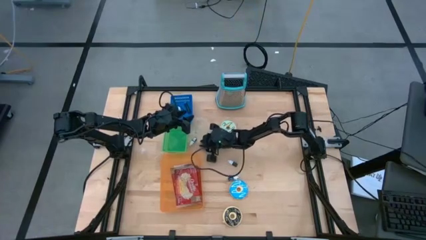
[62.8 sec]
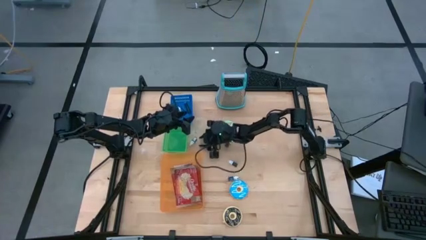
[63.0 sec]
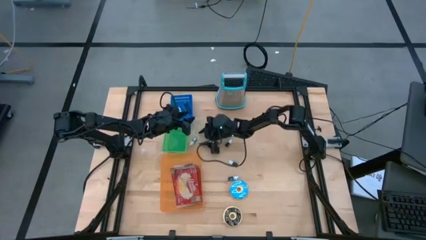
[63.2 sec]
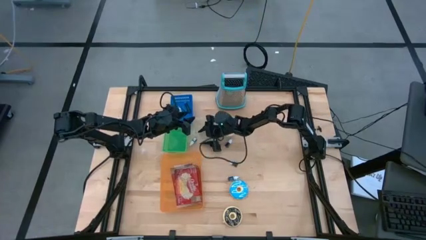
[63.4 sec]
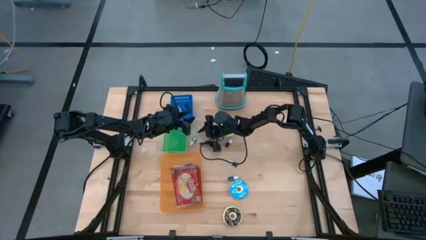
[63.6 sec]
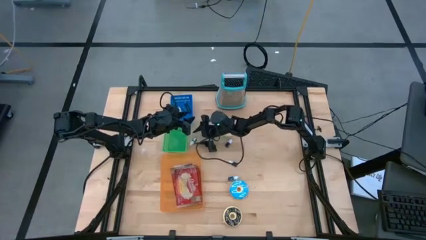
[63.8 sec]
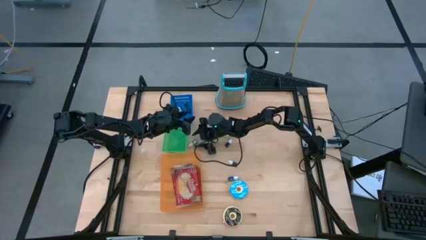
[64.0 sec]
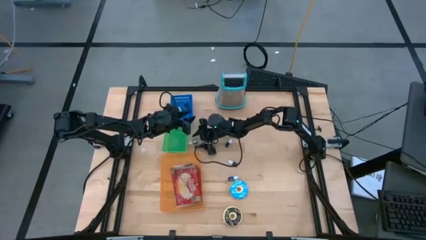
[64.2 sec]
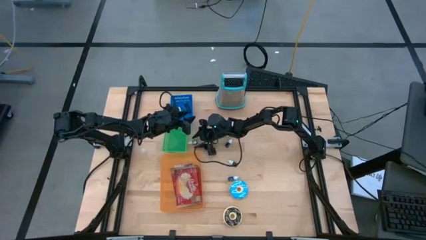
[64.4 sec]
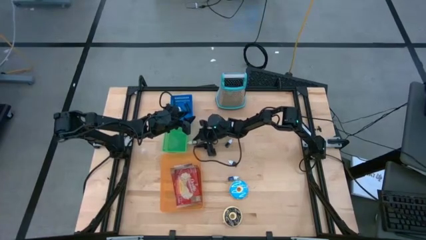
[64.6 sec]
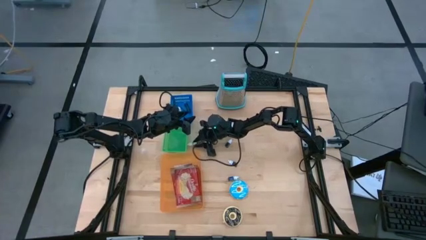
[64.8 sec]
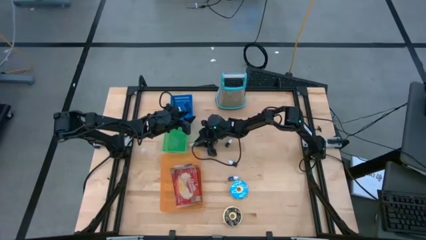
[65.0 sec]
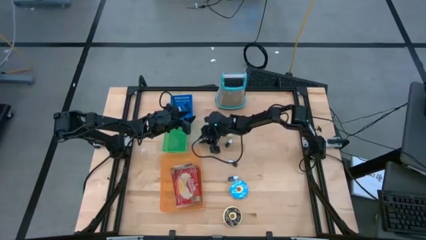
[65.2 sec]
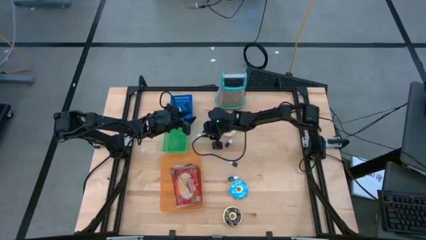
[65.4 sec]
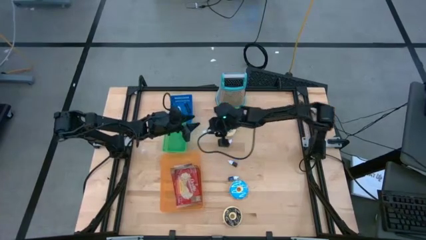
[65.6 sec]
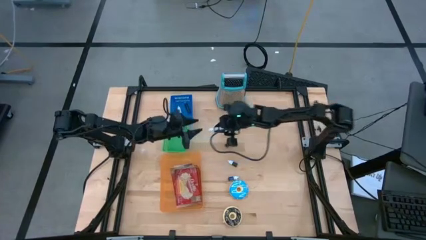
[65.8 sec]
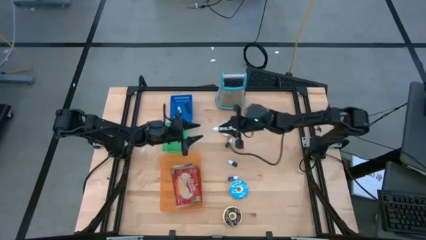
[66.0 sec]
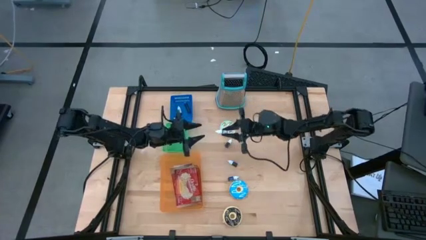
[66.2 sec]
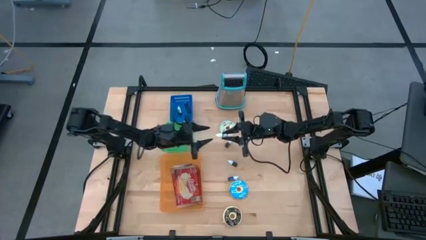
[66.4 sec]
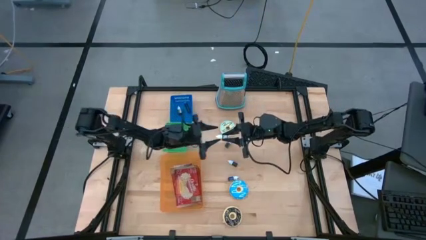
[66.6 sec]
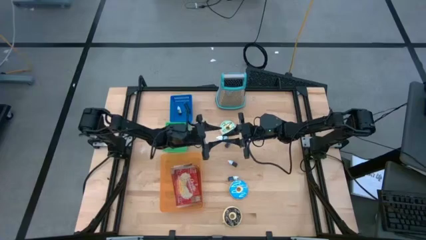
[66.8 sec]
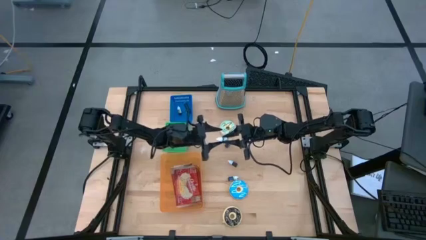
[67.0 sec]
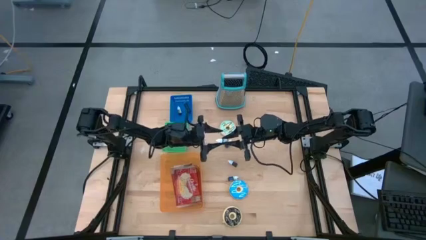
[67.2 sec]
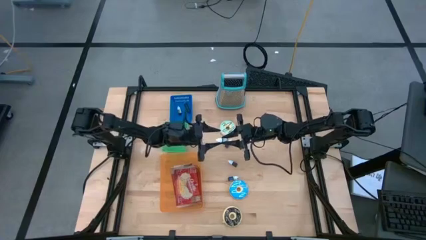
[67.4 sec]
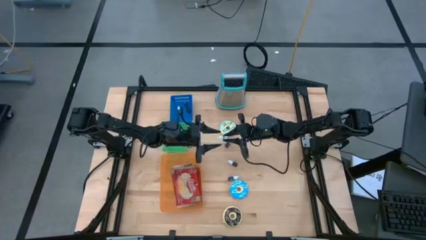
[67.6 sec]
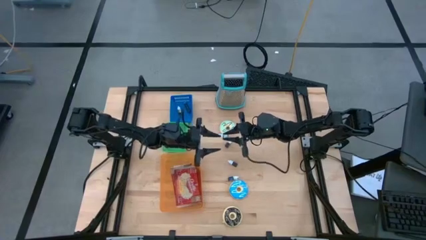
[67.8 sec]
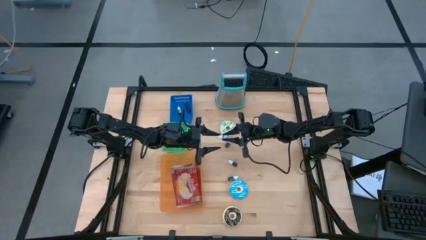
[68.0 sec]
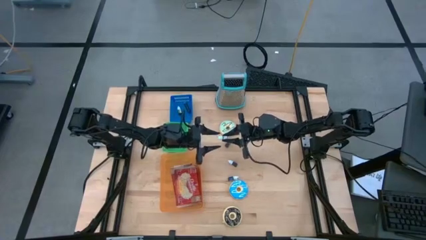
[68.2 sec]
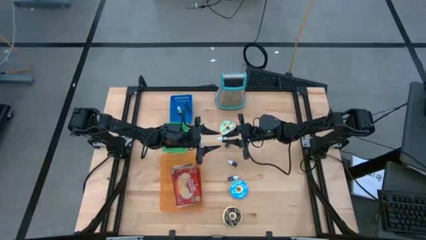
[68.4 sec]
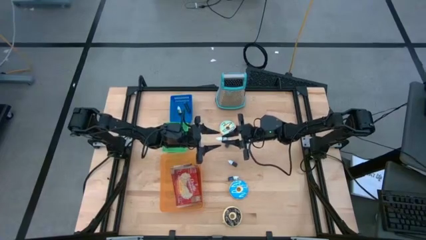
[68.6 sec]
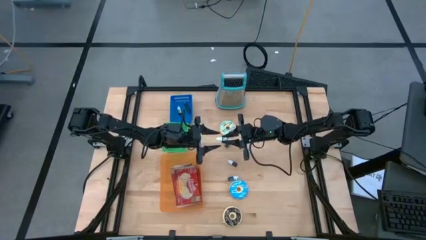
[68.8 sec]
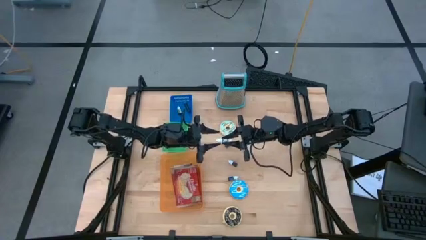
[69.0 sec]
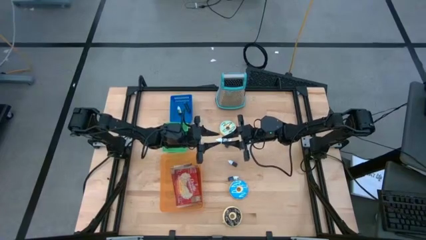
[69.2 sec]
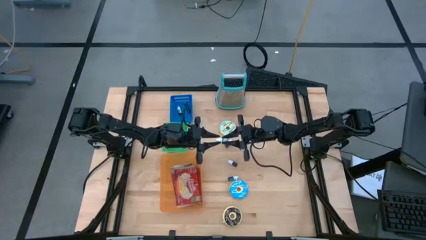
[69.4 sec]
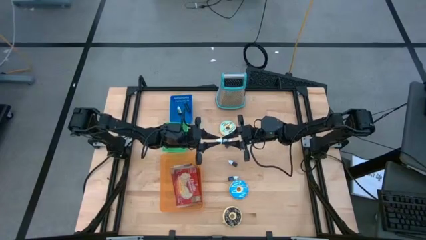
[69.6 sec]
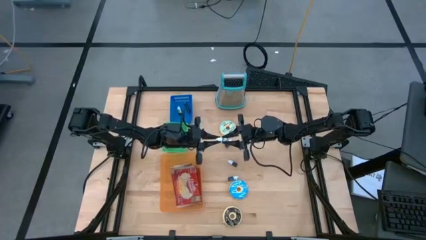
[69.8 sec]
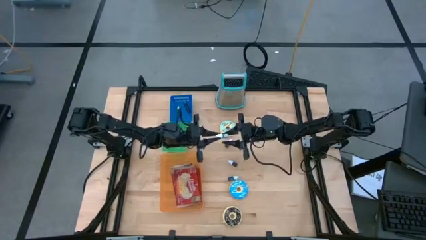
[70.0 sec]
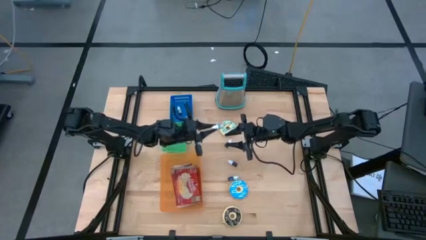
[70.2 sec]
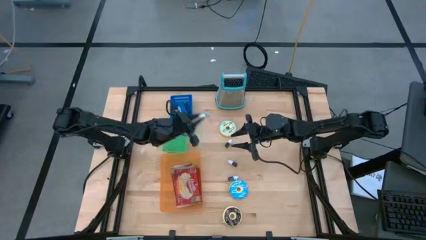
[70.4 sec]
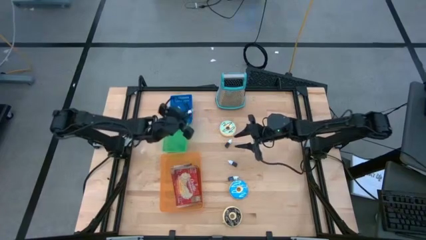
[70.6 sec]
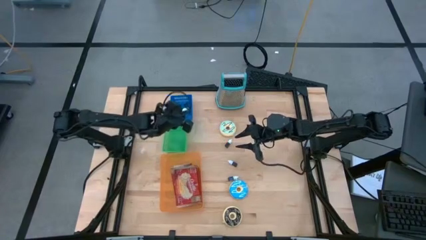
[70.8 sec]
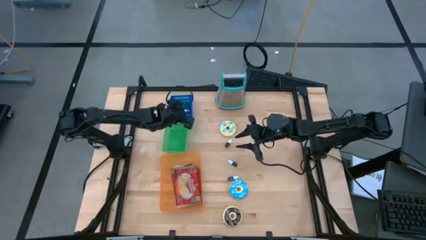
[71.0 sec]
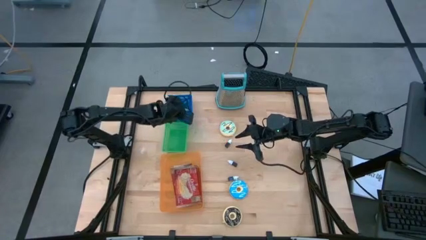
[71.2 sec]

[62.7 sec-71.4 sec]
Put the brown food coloring bottle into the blue bin

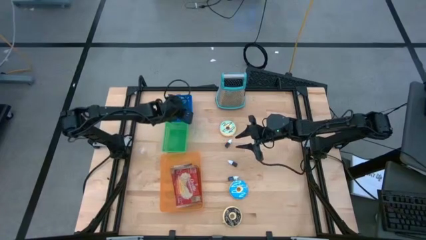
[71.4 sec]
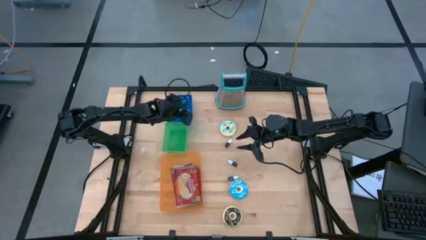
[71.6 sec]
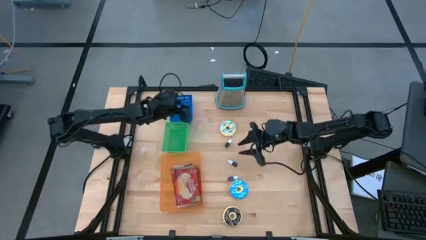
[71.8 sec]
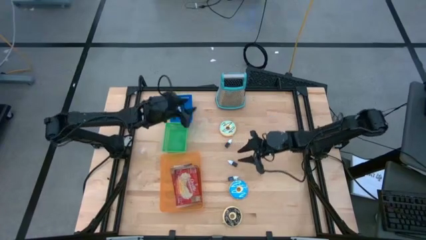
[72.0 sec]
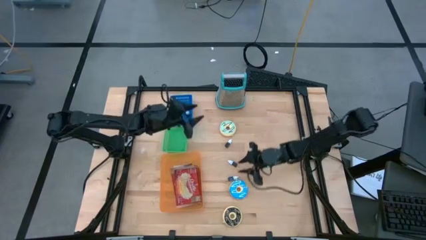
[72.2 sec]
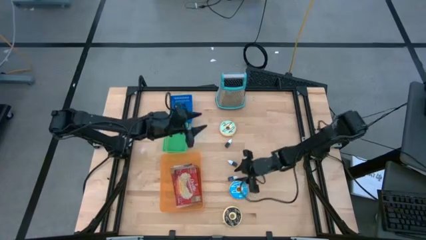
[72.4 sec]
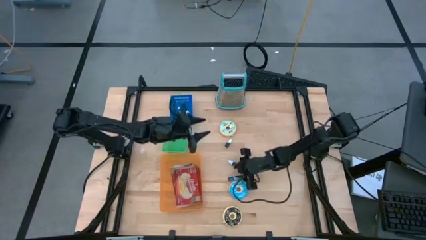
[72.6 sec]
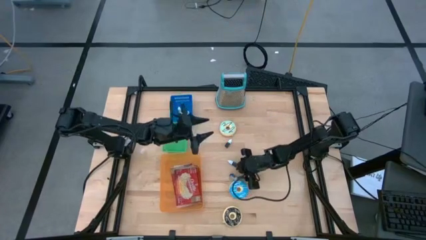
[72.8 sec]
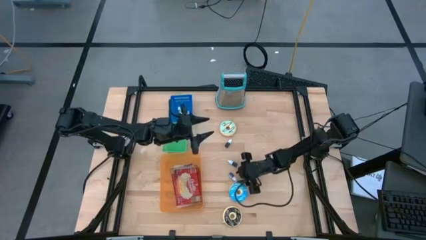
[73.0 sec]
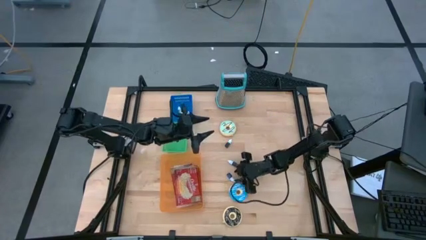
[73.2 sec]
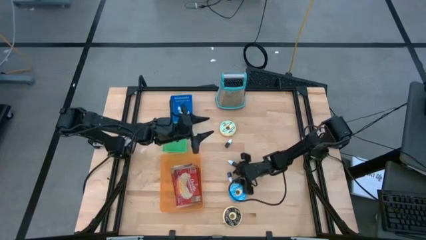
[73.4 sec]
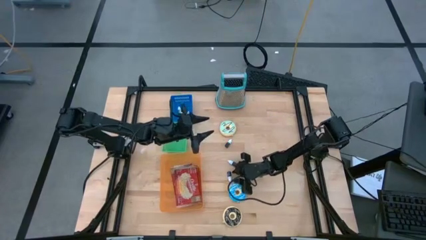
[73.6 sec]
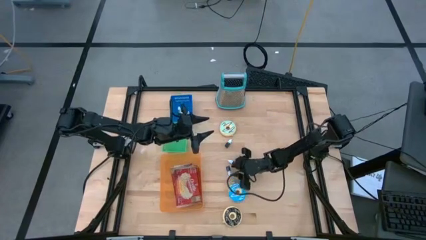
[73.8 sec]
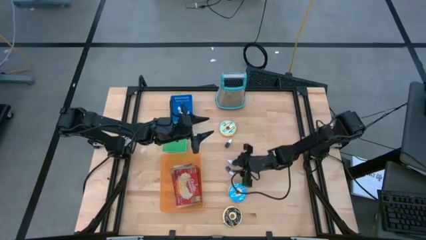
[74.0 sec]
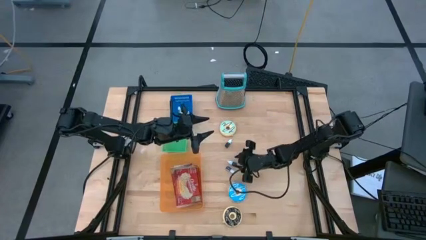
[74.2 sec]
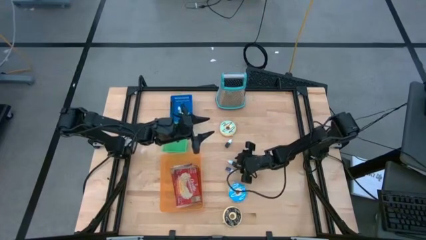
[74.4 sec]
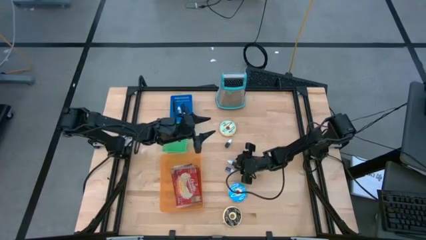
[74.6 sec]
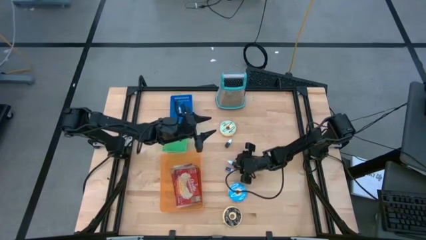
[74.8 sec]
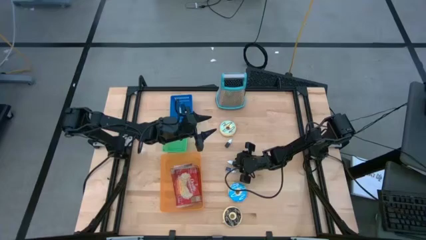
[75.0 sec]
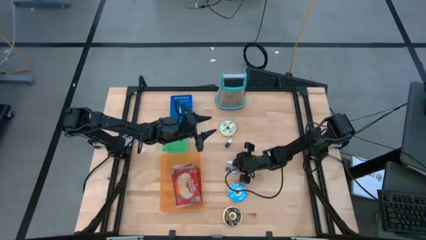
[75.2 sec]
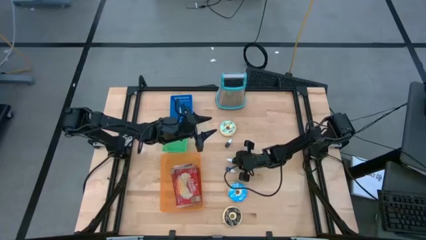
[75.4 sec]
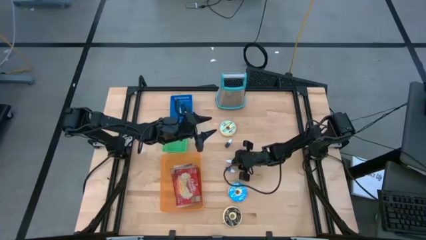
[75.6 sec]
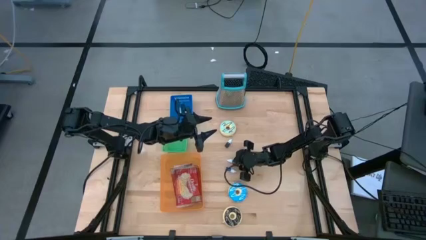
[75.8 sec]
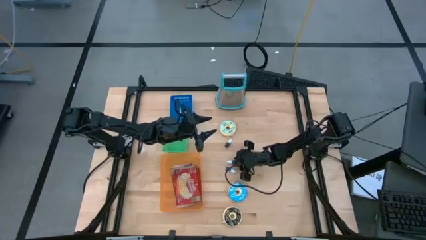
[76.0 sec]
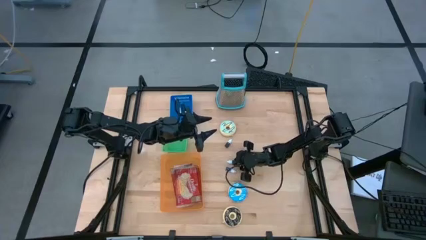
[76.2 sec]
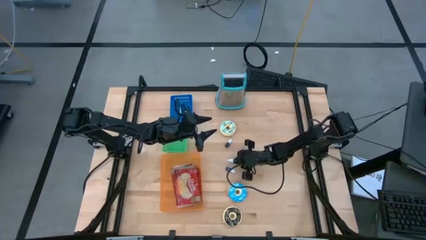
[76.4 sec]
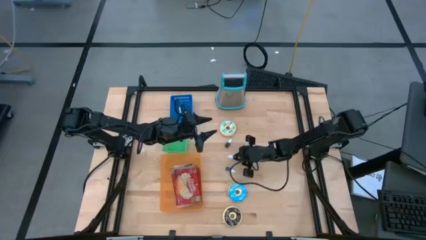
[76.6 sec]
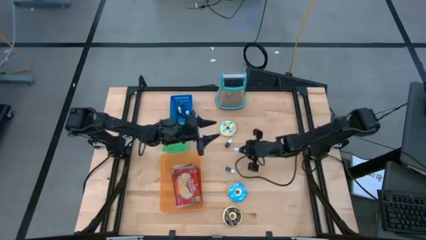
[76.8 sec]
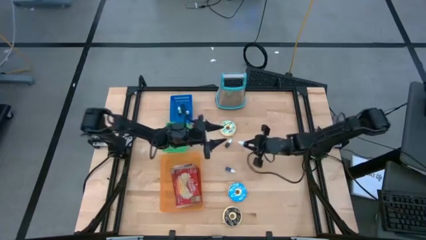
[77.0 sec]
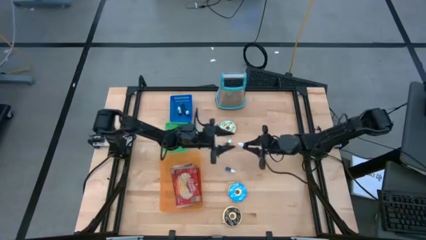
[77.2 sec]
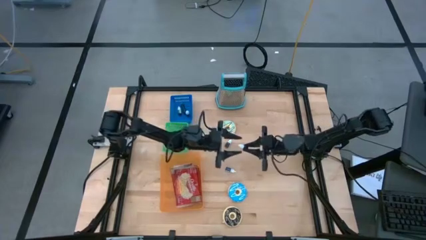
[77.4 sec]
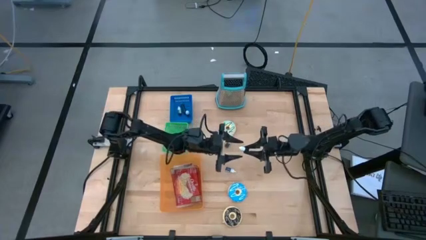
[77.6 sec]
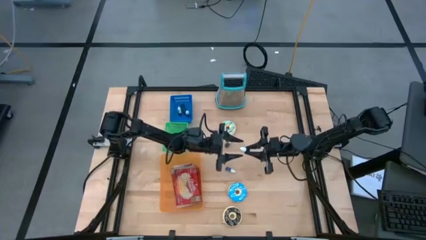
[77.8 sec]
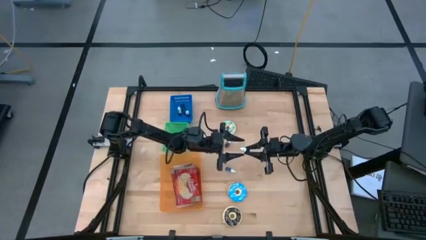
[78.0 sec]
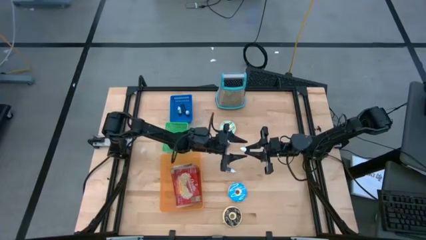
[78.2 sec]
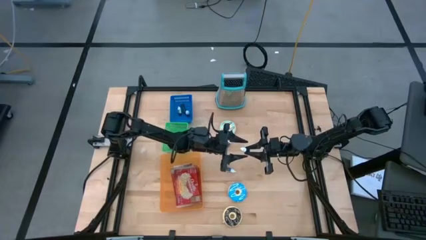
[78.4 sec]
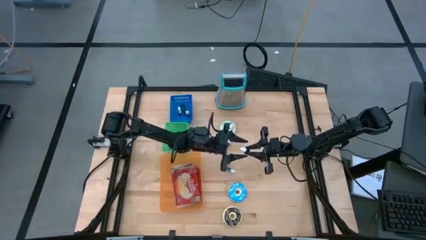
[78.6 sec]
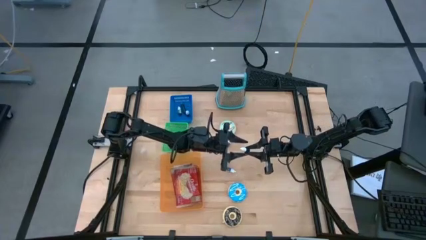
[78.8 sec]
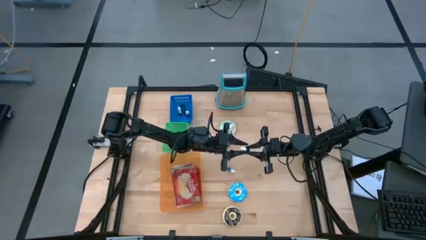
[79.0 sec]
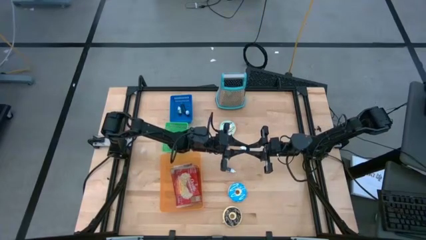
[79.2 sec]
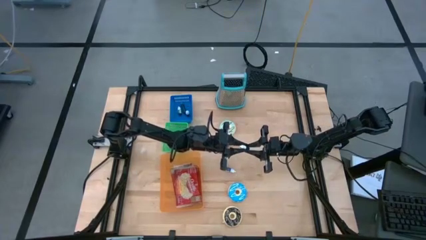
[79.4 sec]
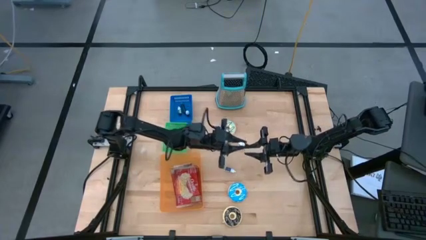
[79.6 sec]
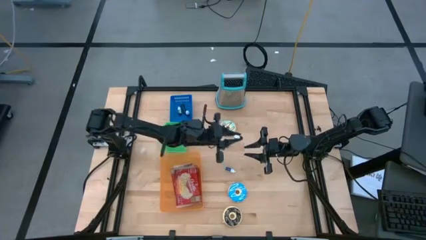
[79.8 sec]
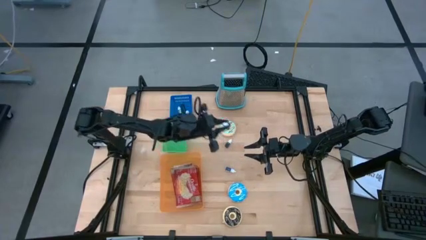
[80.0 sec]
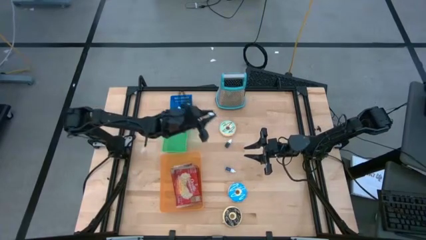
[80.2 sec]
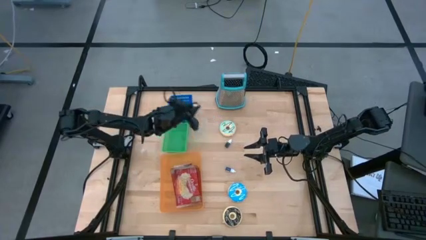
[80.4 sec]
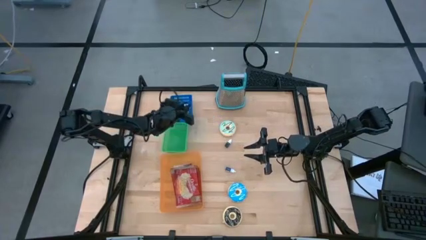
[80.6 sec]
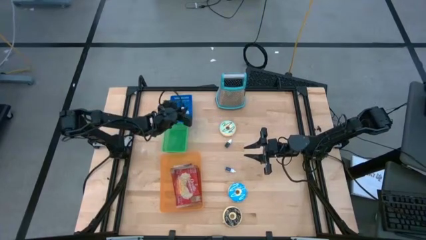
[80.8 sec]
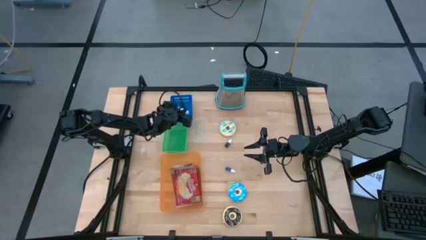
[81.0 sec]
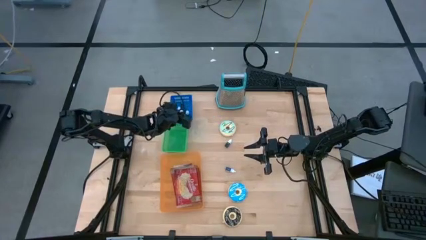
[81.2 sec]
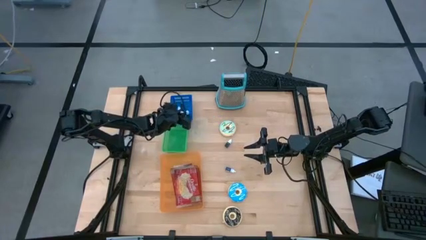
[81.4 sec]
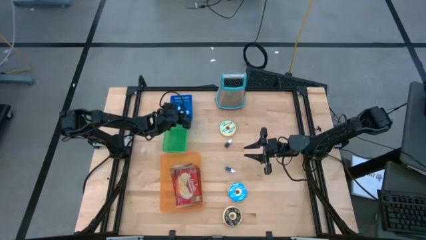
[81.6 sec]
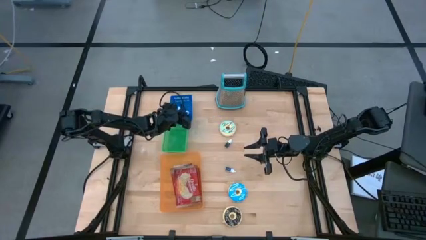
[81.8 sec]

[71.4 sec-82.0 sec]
Put the bottom black food coloring bottle into the blue bin
